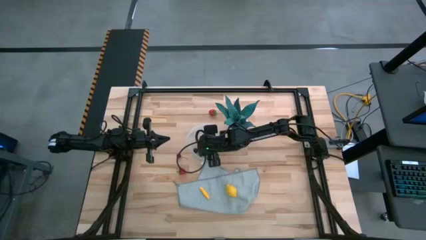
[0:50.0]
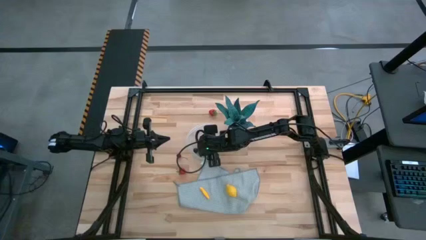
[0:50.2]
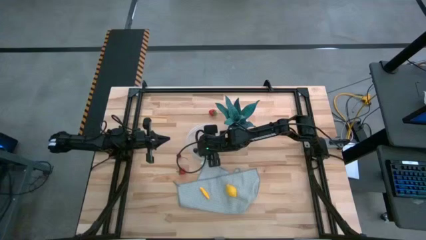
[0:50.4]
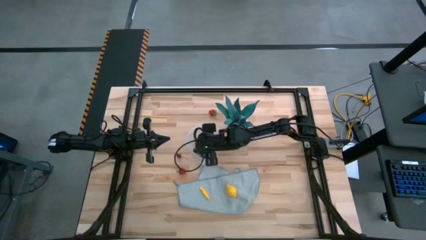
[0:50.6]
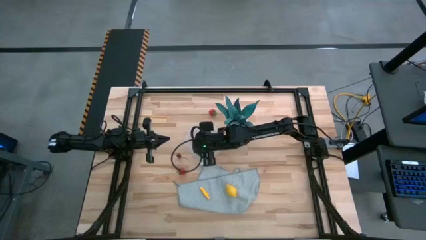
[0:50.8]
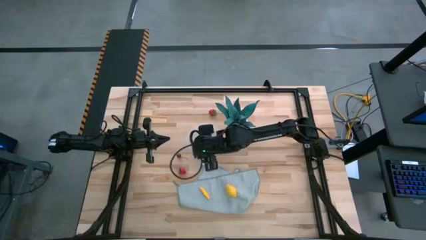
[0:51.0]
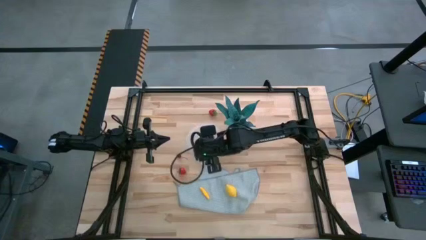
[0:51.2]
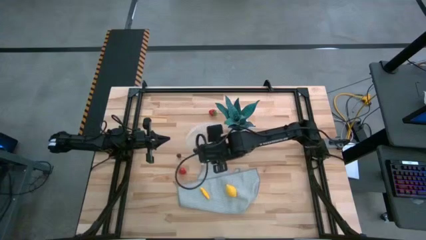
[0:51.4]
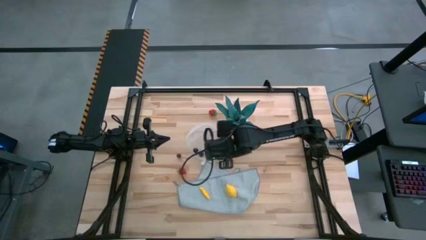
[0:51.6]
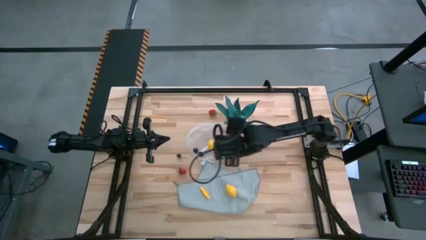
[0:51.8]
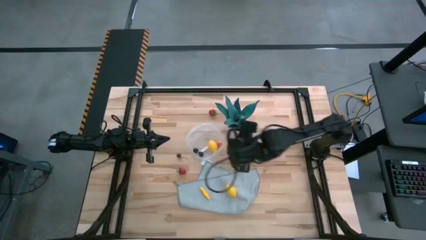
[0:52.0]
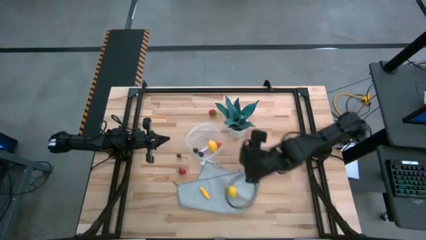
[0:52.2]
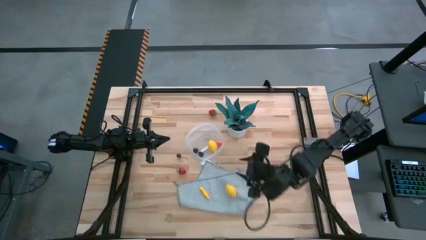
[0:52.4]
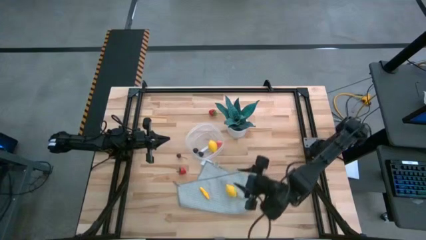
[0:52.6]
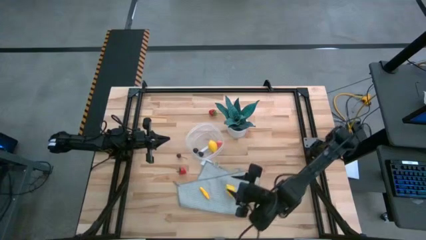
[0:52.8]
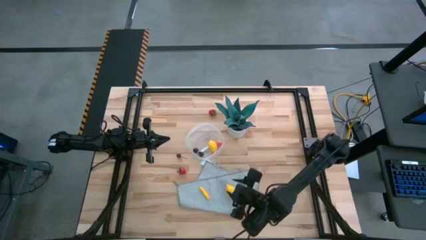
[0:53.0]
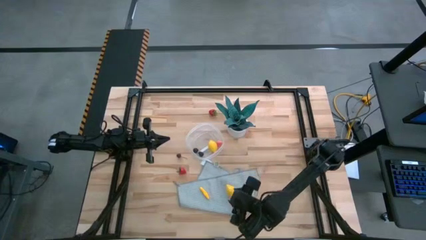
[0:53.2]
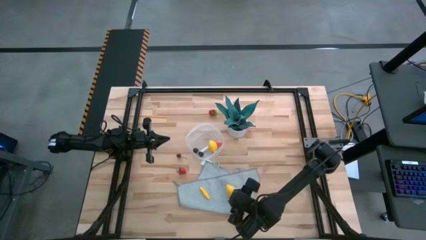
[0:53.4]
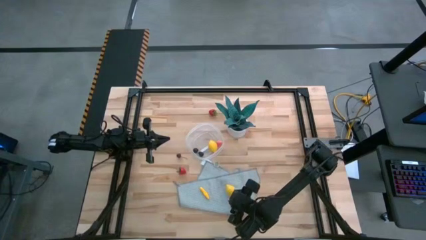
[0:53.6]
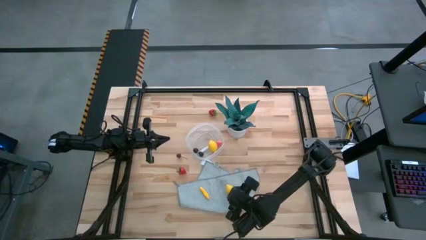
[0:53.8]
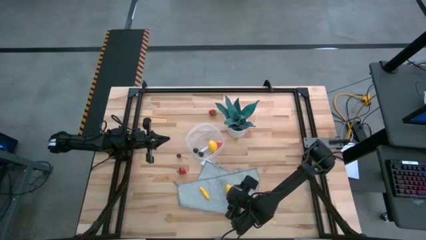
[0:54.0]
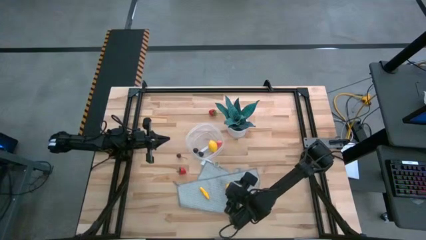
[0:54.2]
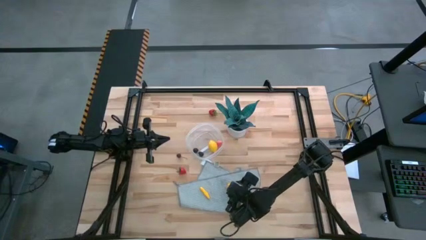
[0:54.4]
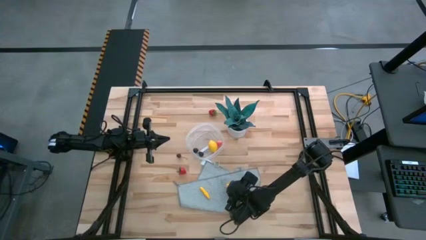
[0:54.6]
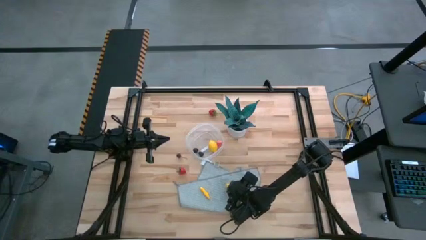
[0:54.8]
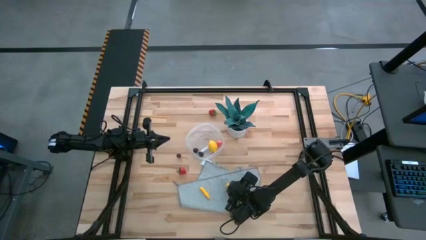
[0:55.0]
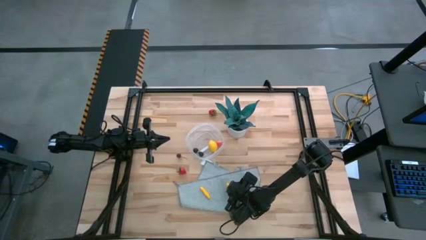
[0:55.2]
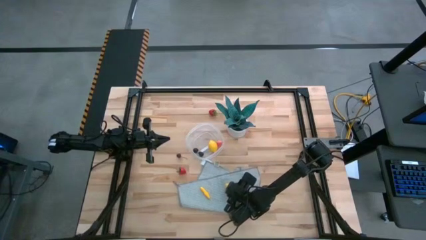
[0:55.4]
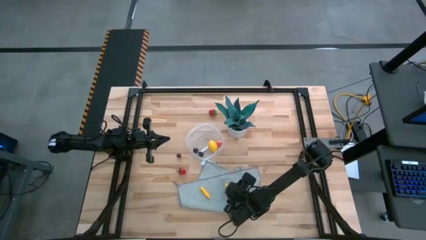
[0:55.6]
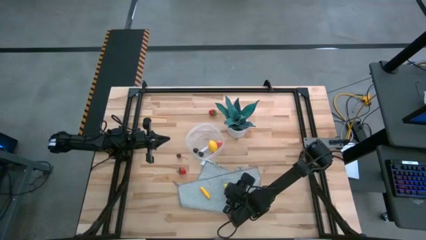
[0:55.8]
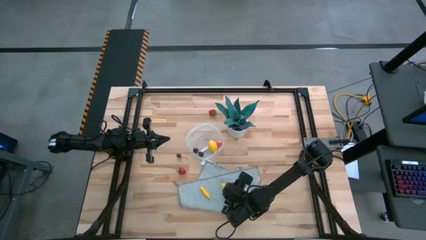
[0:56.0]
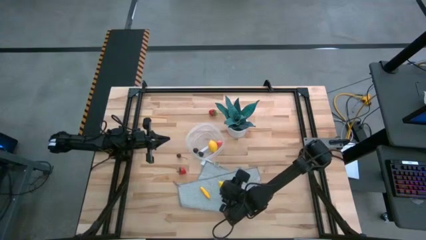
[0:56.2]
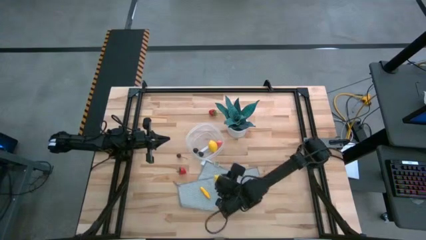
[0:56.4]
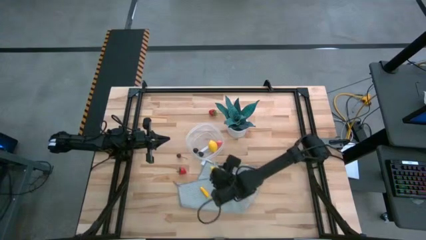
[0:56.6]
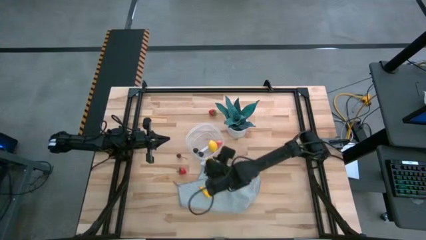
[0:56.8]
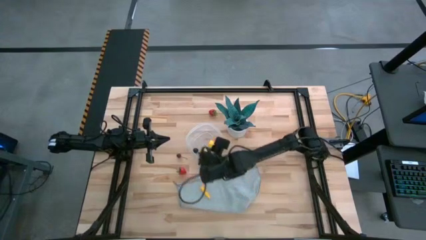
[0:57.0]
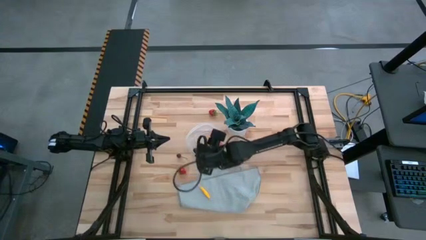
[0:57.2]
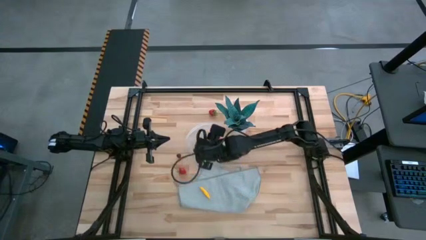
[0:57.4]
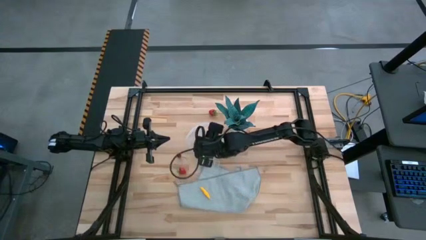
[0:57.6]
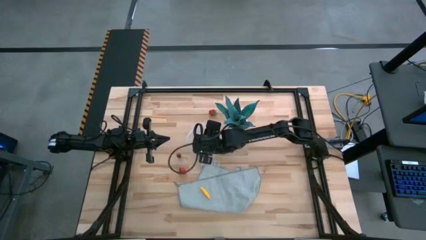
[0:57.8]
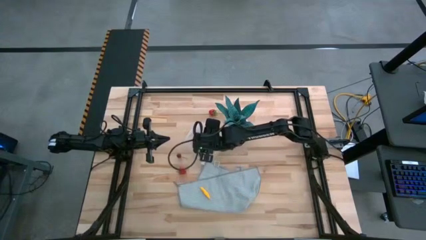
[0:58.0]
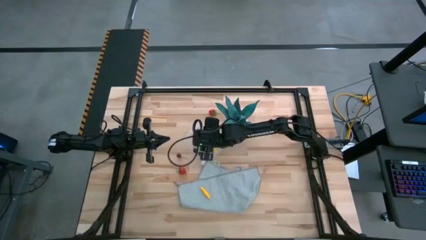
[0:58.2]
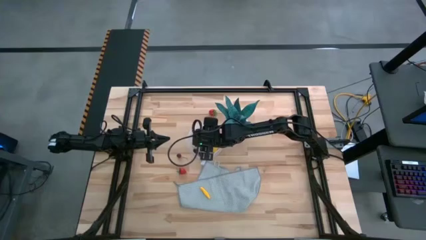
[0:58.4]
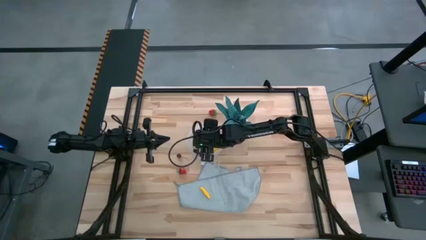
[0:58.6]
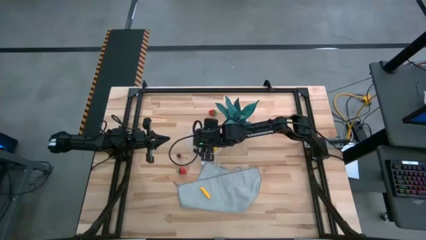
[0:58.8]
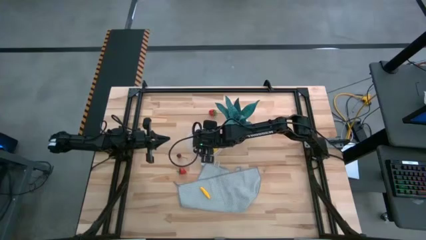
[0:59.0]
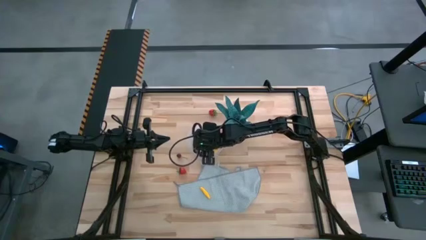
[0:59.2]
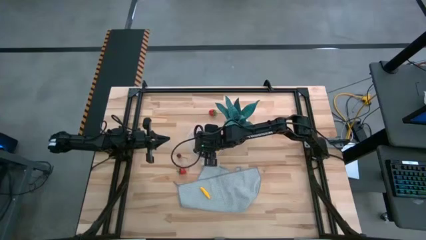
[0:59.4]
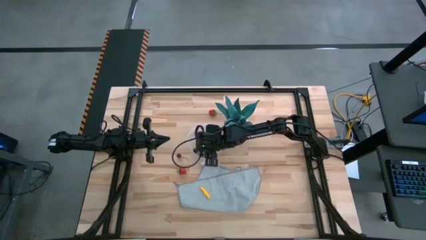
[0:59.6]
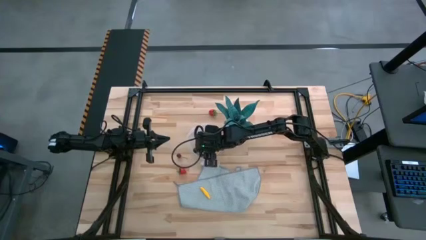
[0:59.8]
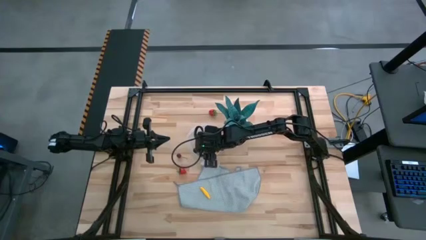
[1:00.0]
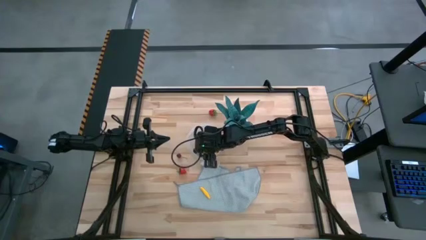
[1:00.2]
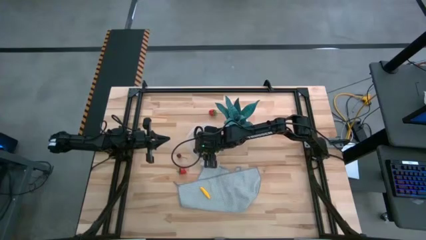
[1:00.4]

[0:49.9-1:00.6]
Task: Pick and placing Produce into tupperware
Put the yellow lemon into the container
